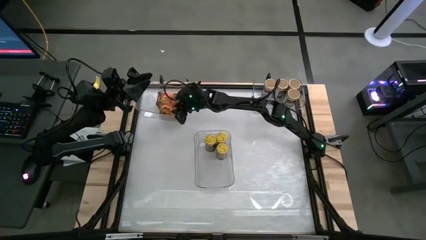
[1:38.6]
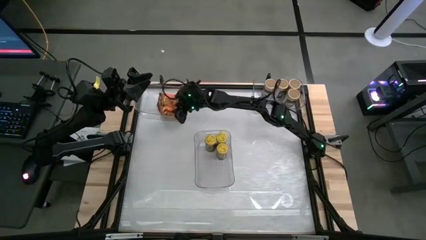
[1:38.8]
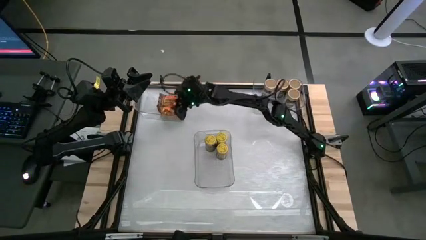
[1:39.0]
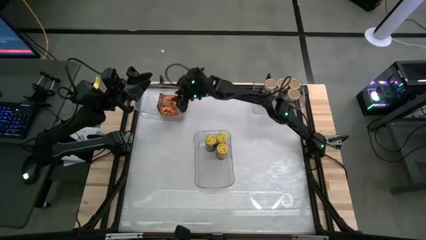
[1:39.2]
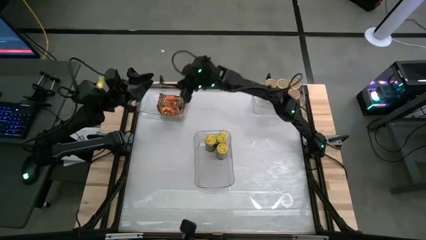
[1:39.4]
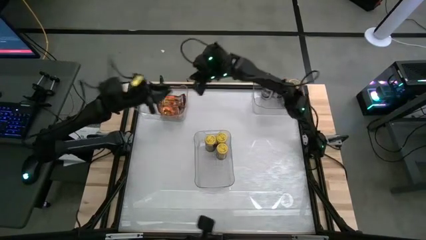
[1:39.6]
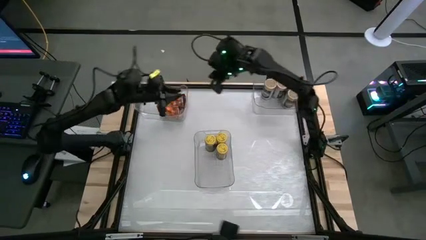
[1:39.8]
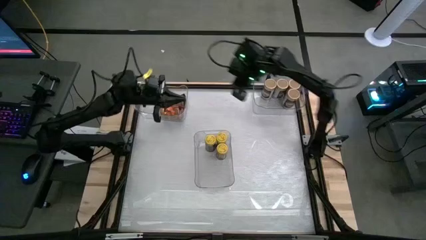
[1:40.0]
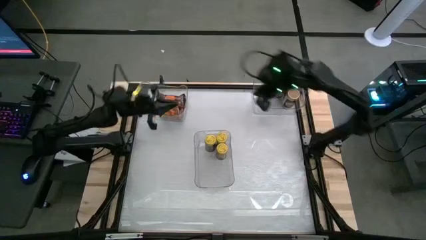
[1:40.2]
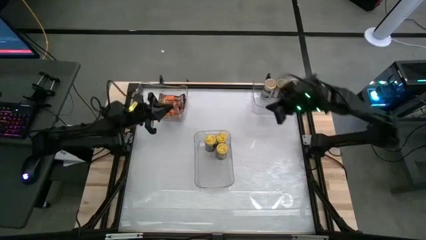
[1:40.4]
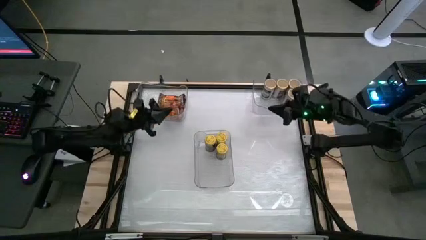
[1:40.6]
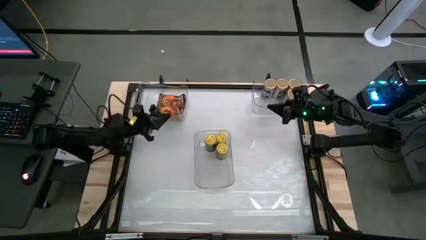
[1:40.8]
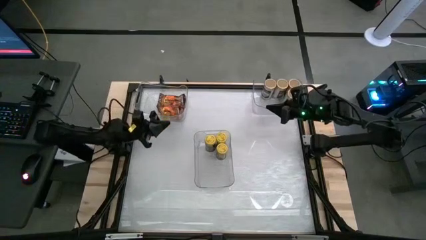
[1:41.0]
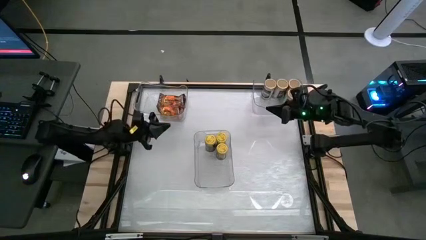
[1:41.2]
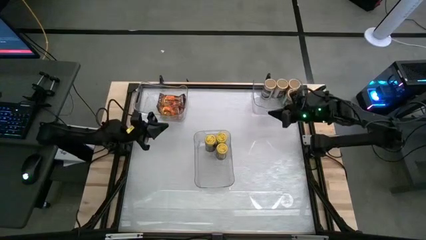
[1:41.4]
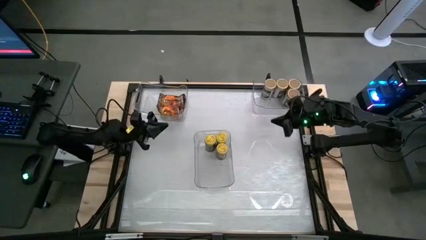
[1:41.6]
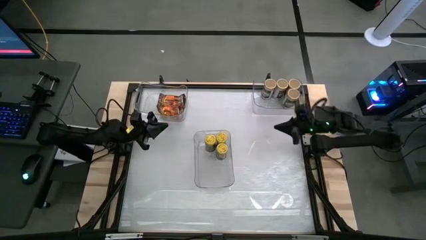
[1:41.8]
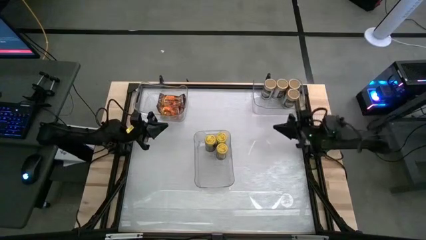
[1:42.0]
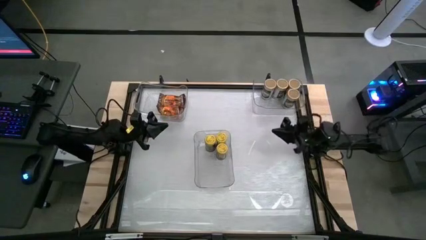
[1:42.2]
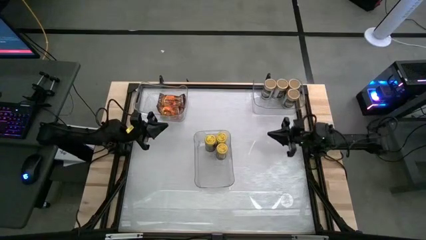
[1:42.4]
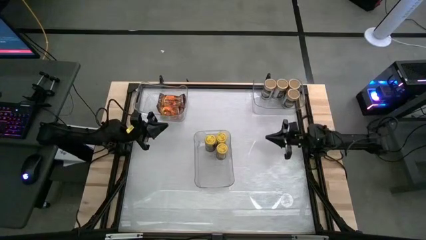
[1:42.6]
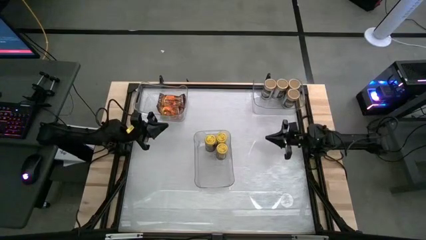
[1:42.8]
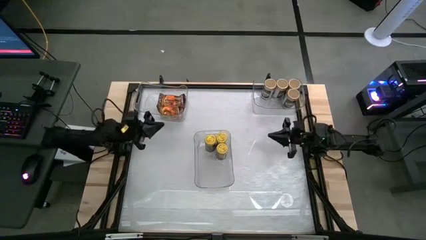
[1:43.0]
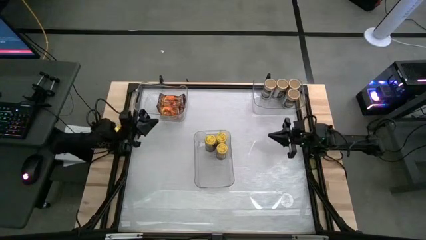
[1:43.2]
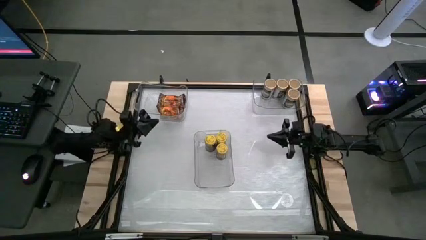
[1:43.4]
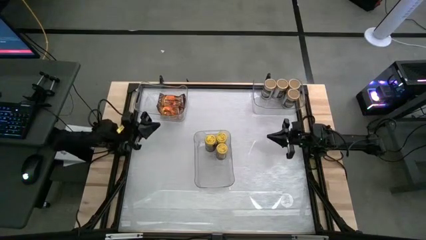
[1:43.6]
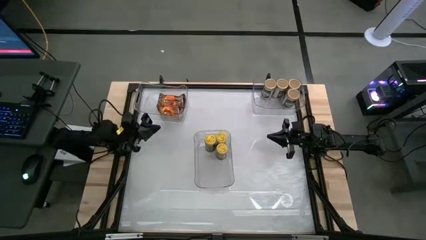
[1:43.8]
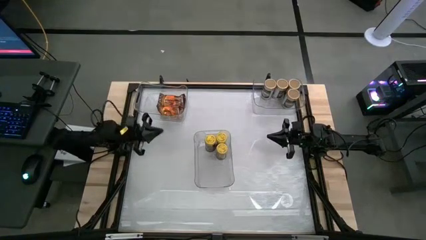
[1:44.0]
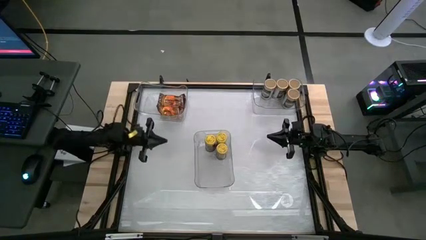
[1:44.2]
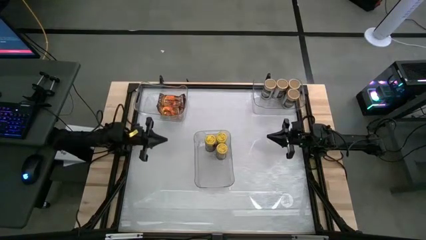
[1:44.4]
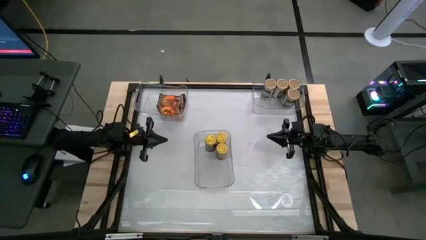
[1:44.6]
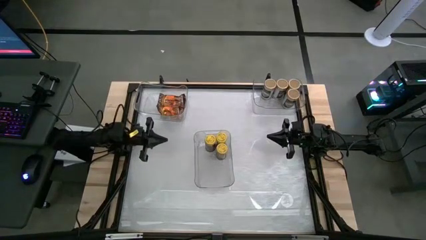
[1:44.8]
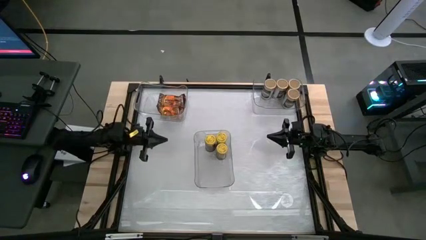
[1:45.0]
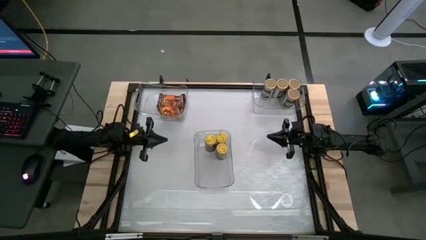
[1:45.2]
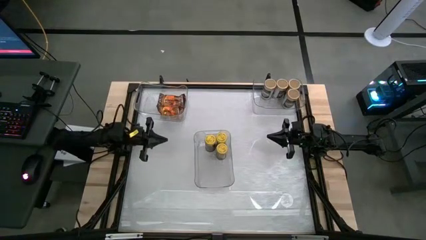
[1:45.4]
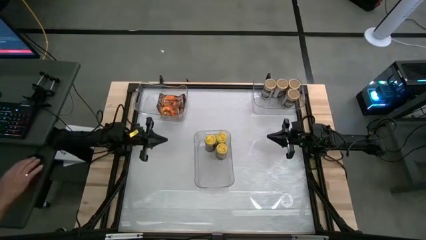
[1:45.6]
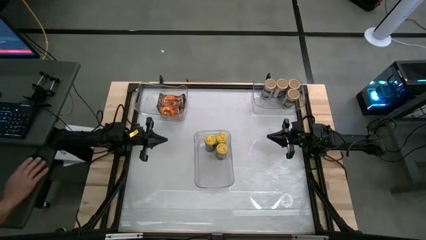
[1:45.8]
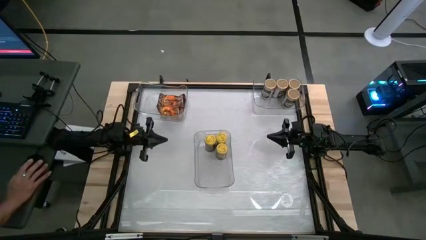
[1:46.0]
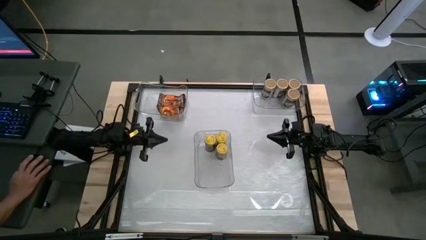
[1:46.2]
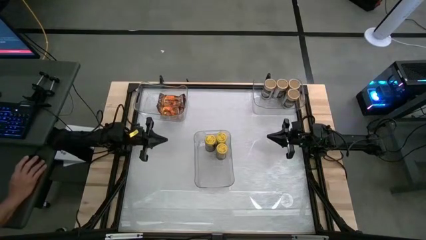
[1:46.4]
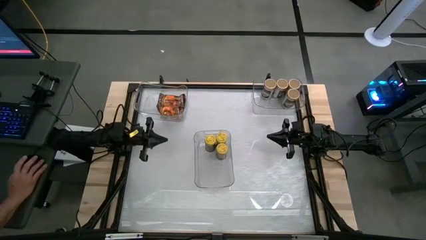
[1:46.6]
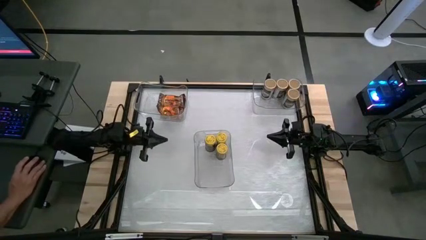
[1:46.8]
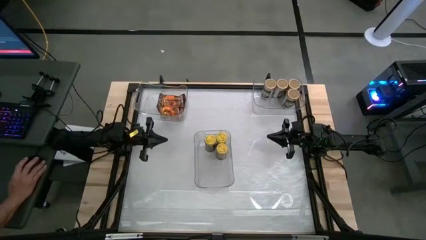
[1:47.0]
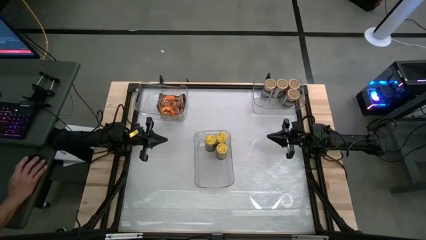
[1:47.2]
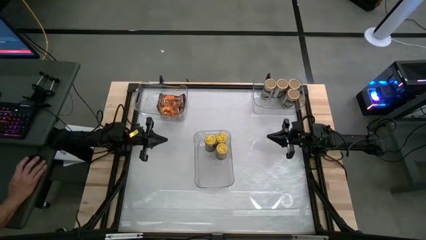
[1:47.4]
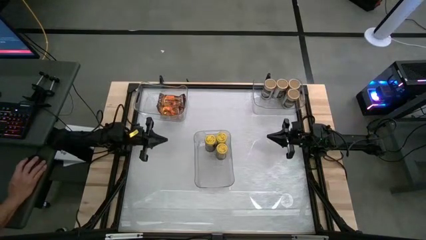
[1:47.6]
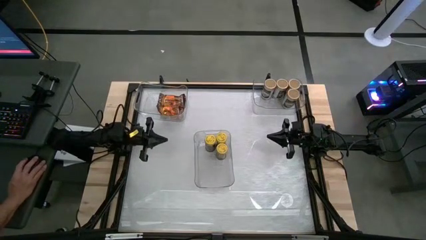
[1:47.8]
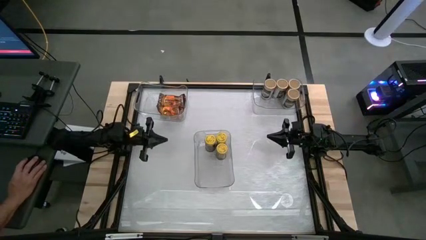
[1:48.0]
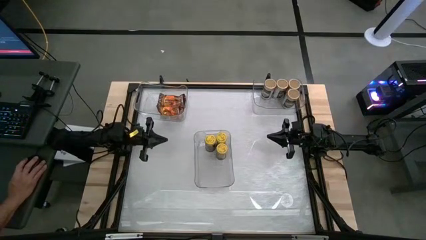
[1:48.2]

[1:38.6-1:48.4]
Task: Sort spices by type
Return to Home Position

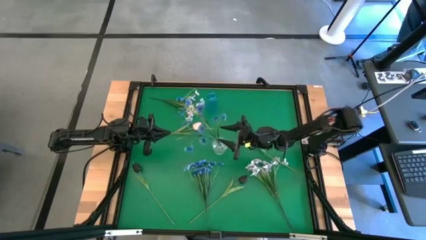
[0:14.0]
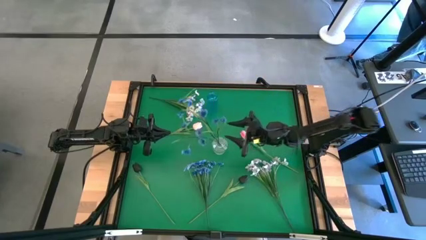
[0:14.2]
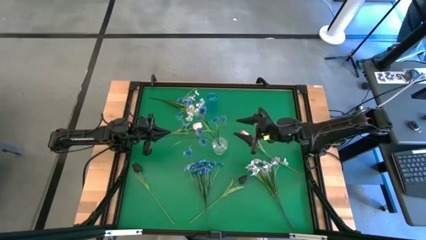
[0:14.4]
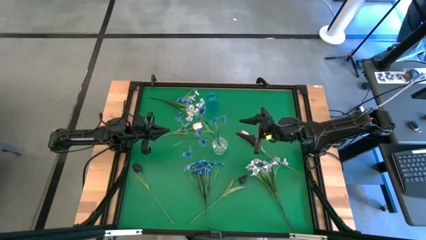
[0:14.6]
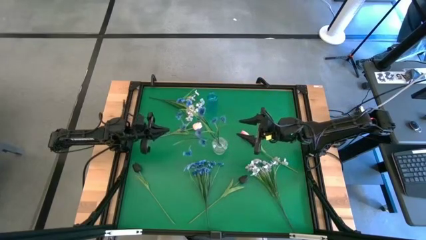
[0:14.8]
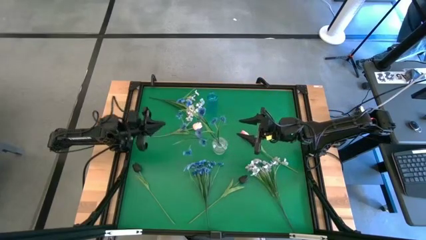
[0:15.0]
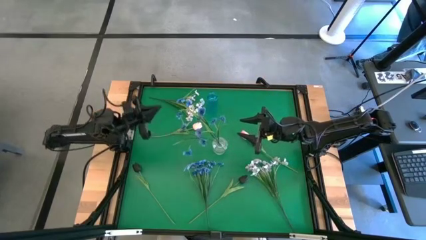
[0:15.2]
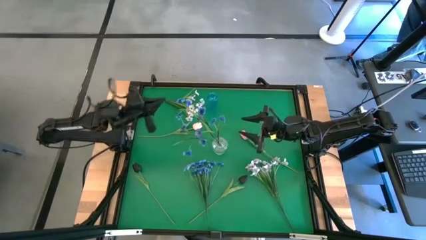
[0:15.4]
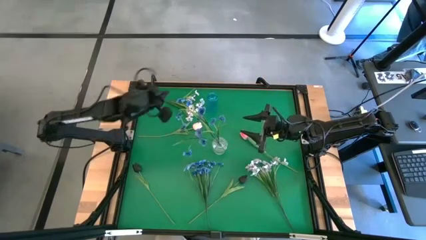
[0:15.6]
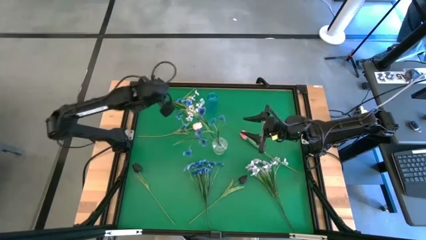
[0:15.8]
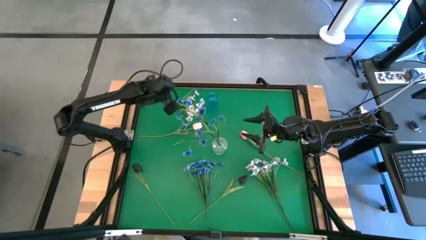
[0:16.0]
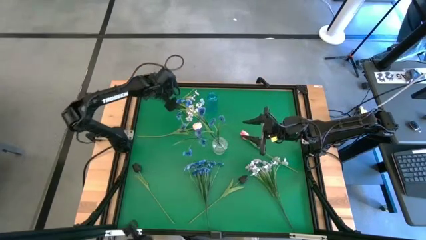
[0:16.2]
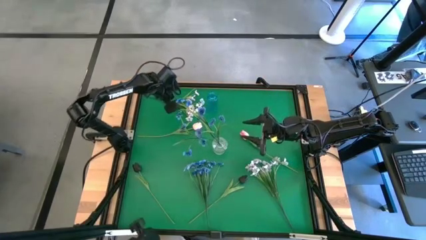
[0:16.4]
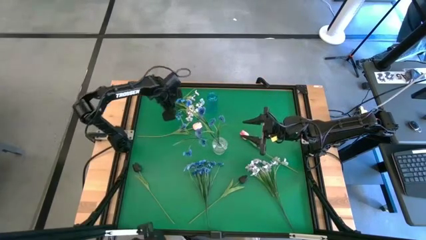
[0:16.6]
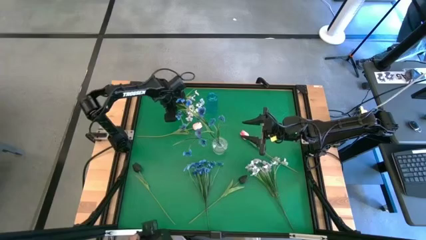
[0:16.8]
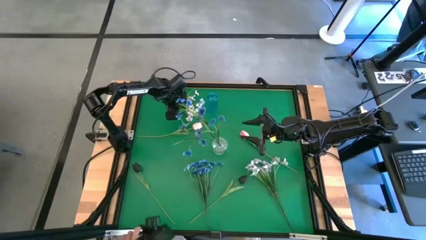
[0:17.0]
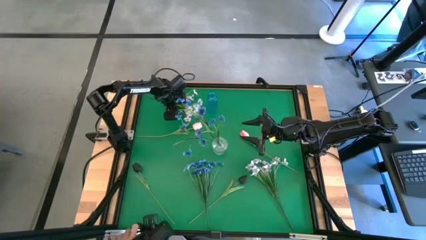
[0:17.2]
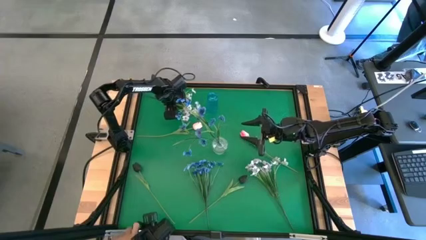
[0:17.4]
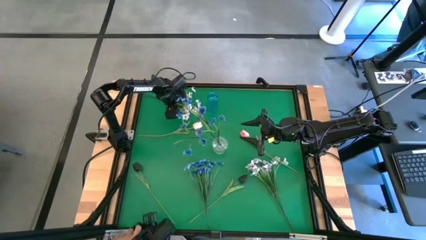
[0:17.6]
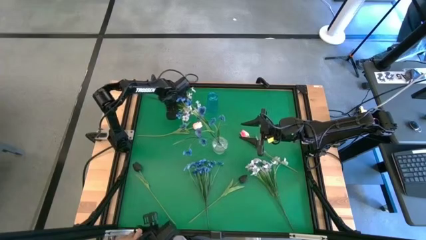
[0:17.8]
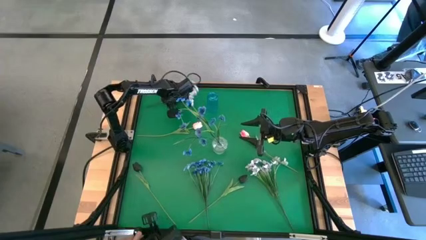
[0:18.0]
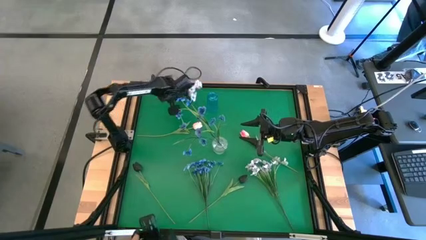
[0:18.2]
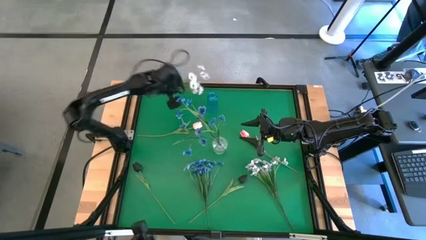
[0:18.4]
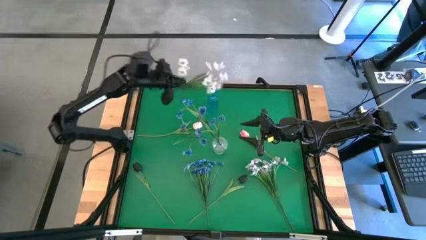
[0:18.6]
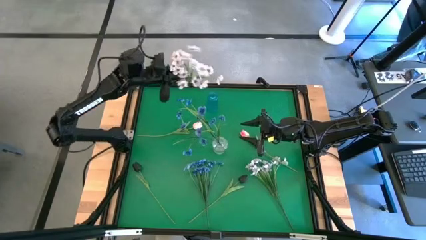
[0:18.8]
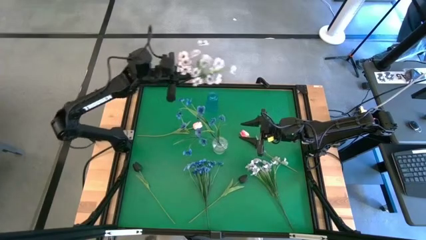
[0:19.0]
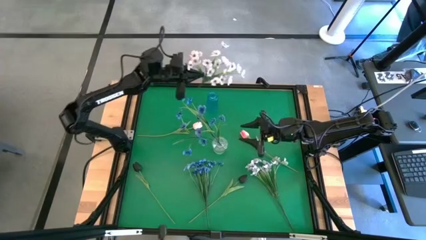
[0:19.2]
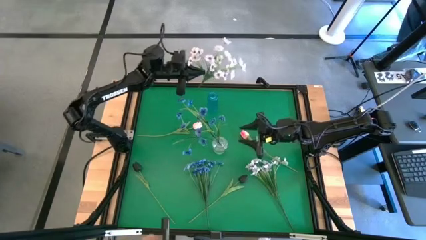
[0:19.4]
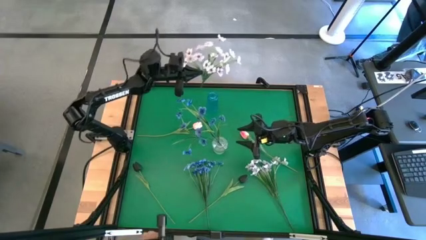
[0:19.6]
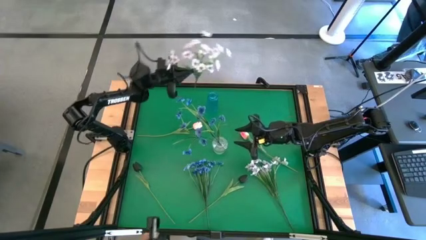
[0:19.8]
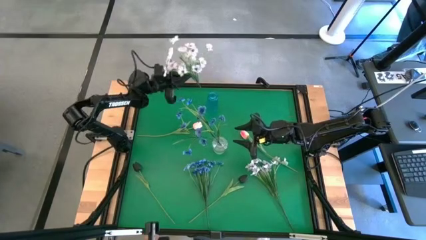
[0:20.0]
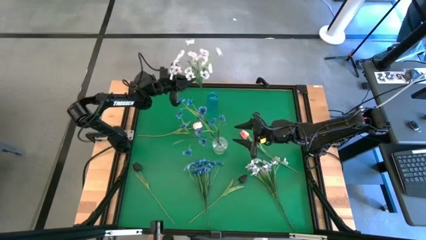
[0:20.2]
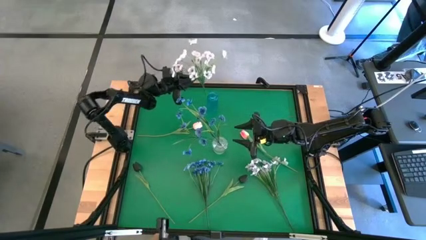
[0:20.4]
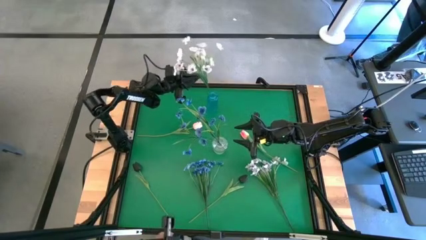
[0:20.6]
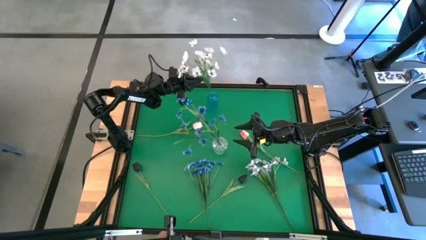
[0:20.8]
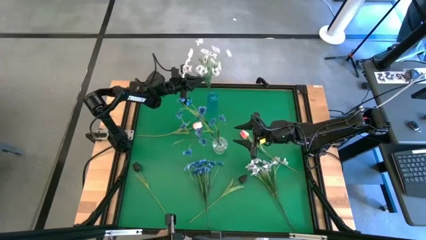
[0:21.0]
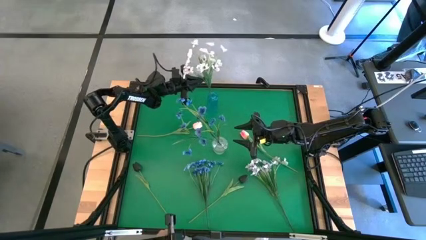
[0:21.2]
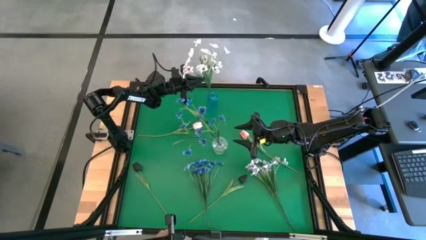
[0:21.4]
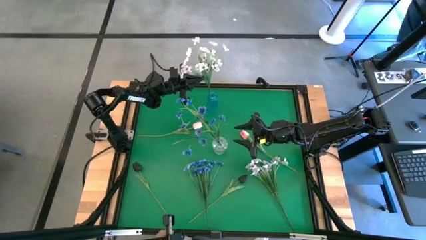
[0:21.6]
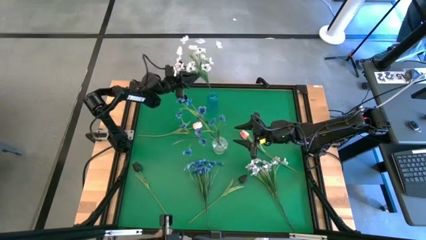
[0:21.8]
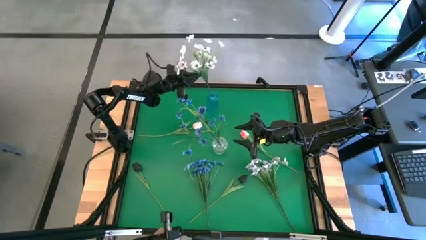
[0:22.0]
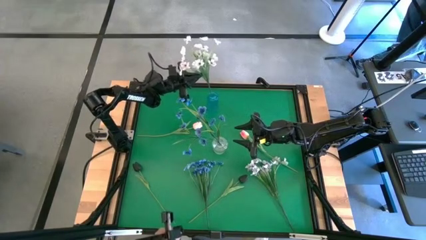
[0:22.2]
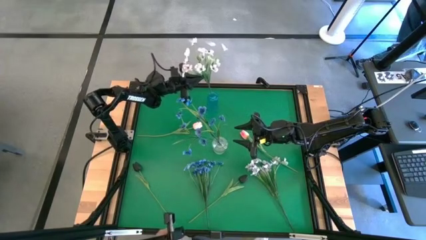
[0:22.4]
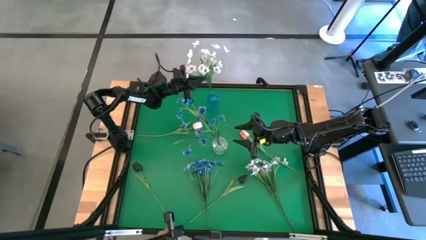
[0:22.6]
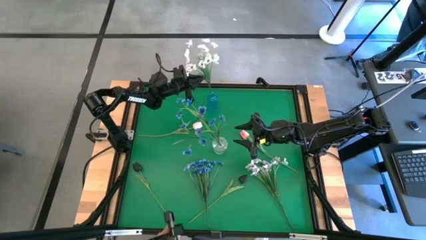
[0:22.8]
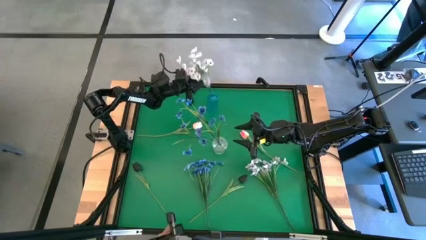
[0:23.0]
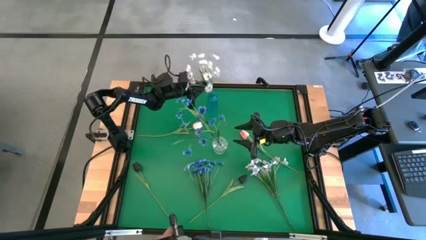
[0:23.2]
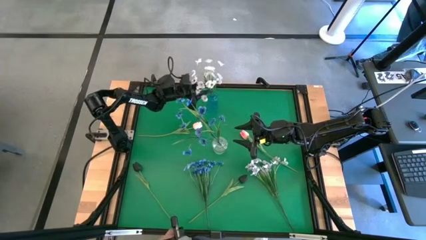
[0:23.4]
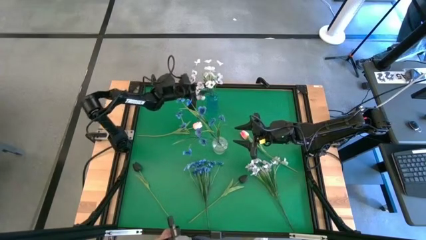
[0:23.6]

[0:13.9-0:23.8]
Task: Sort flowers into vase by color
Put the top white flowers into the blue transparent vase
